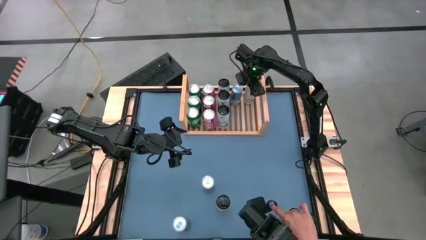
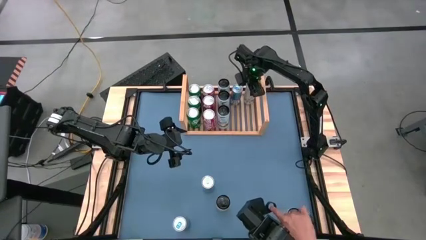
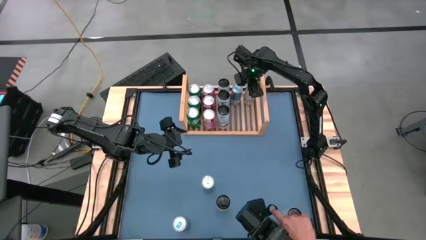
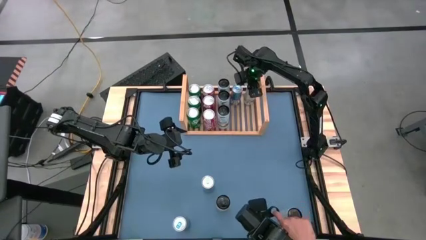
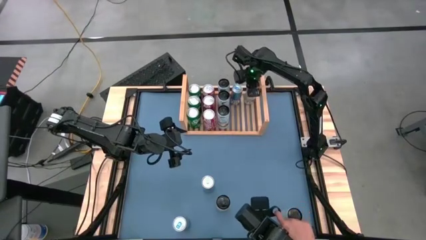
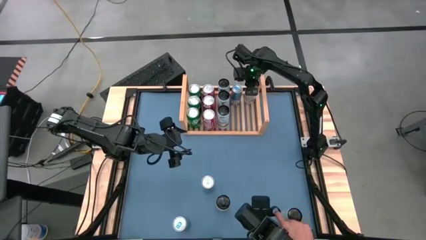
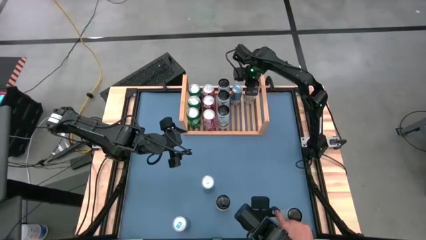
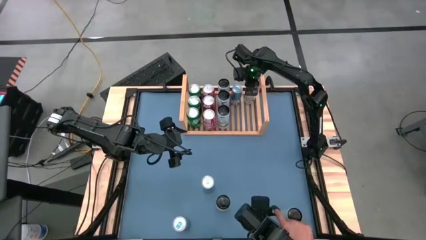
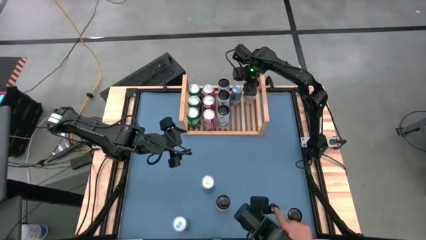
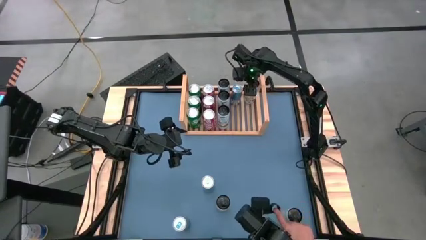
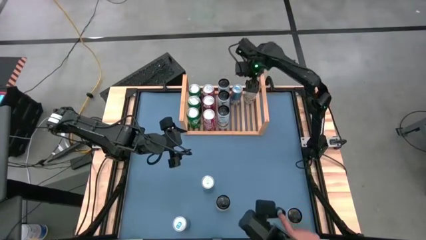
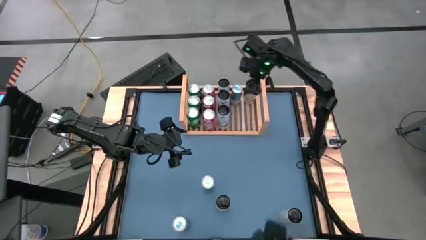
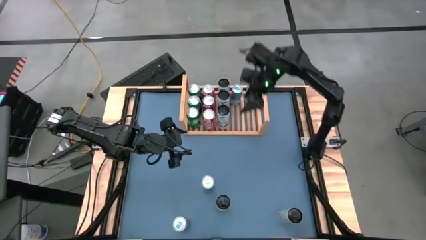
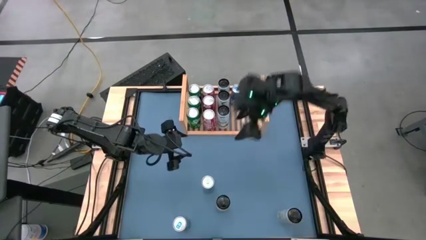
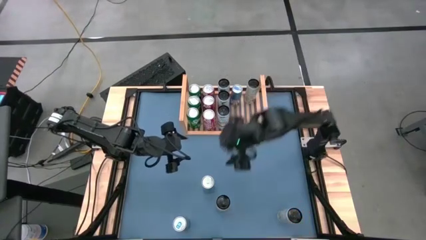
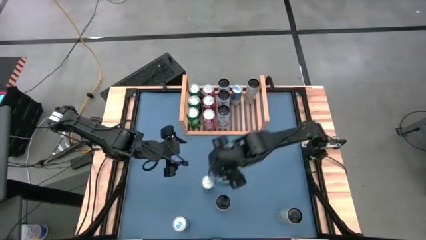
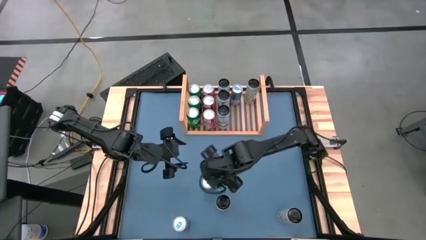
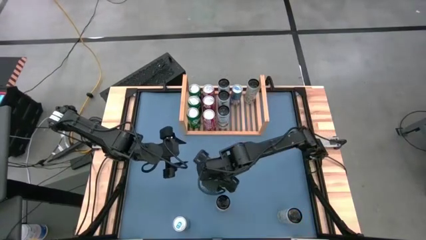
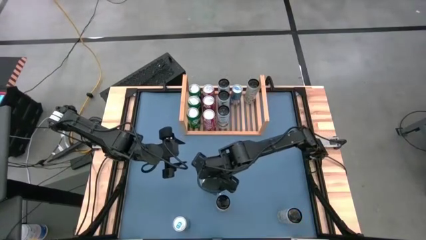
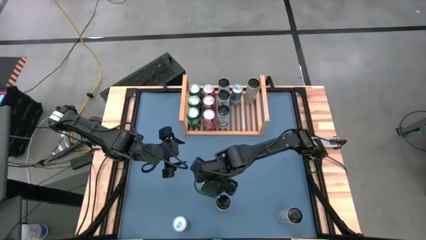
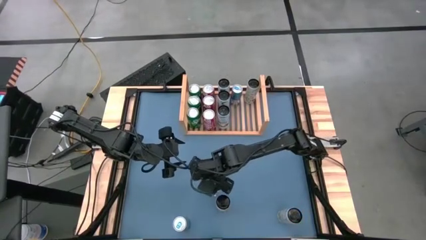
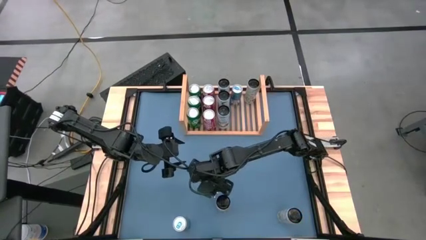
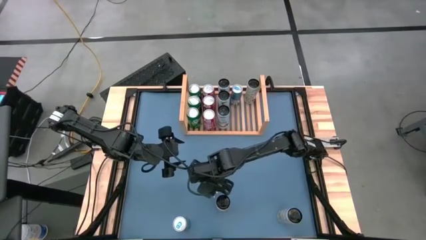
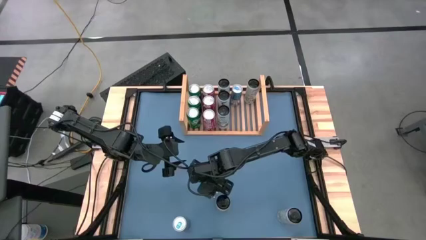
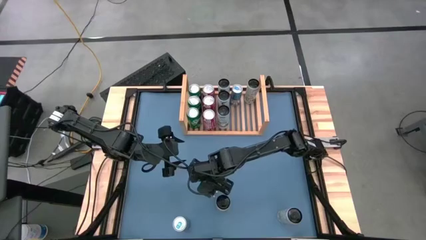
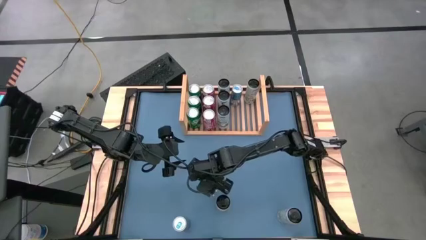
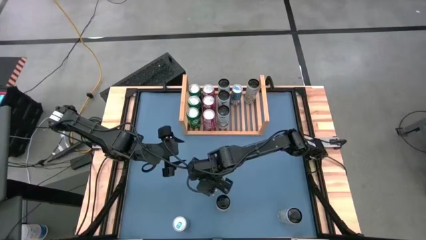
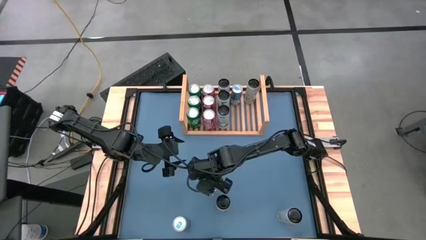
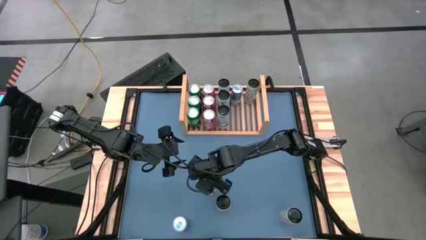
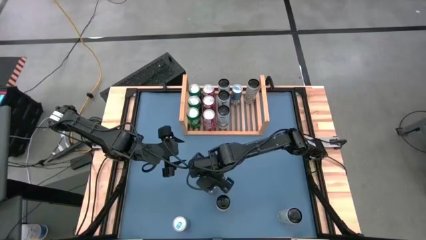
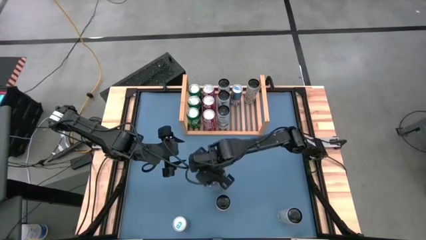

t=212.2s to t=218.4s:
Task: Place canned beverage on shelf
Put the left blue soda can aligned with the blue soda on the shelf

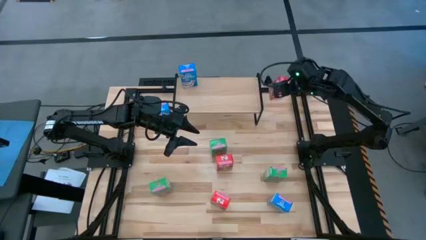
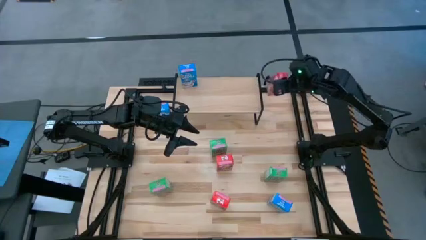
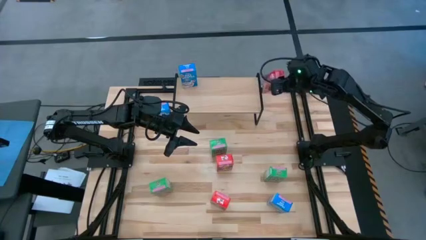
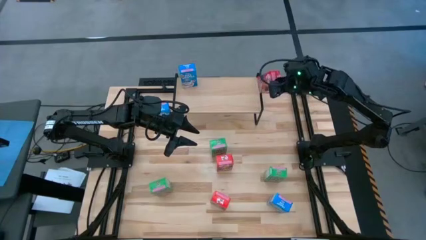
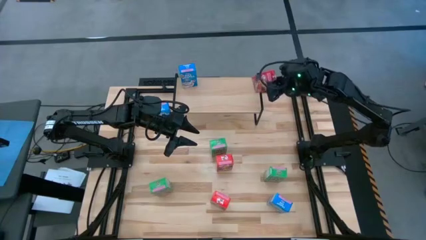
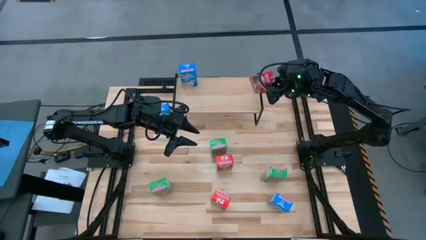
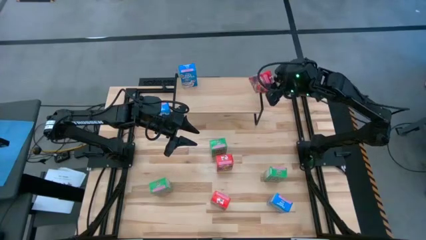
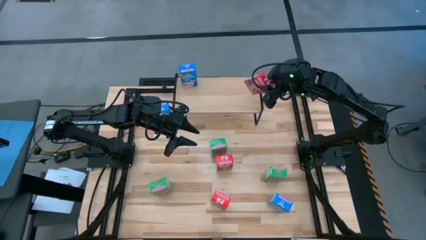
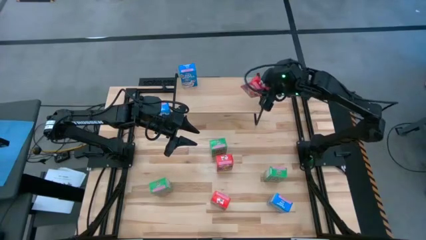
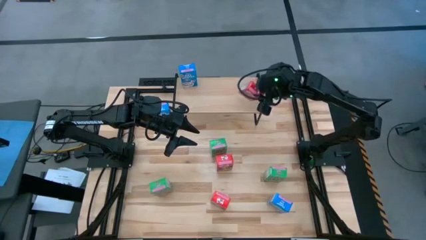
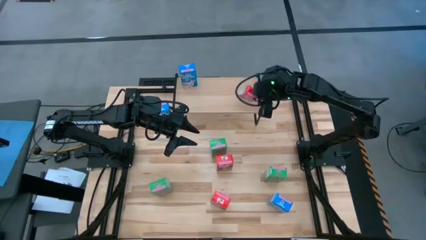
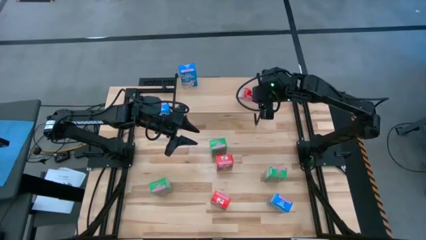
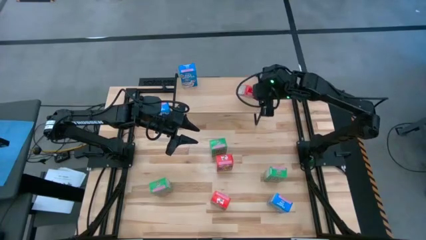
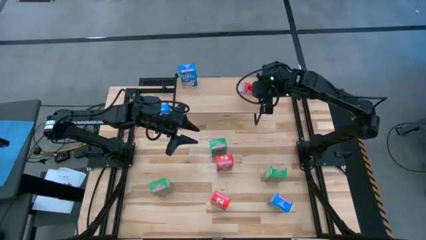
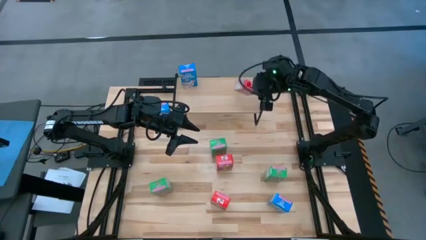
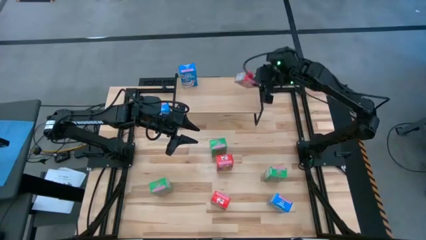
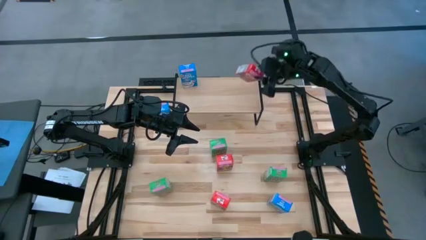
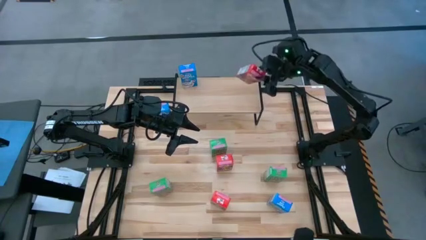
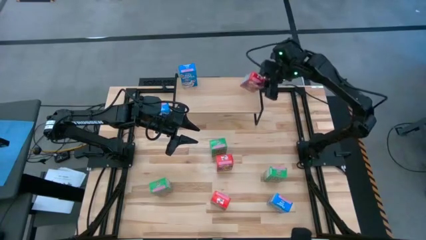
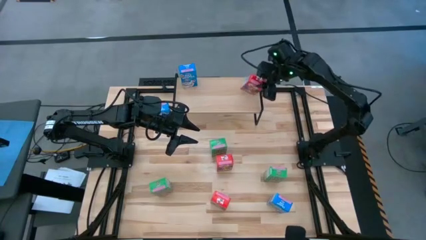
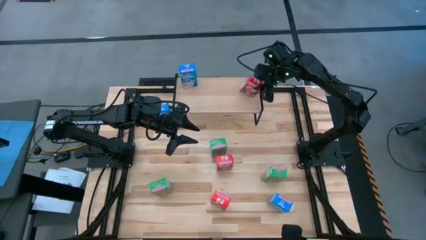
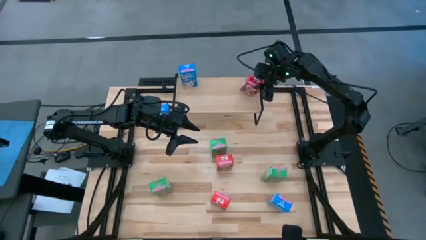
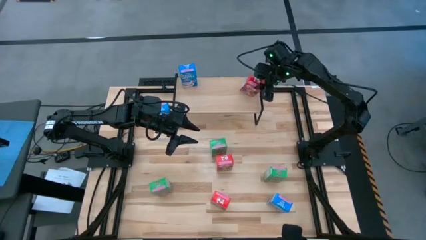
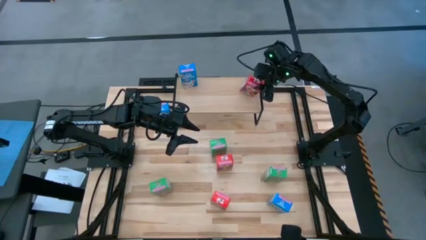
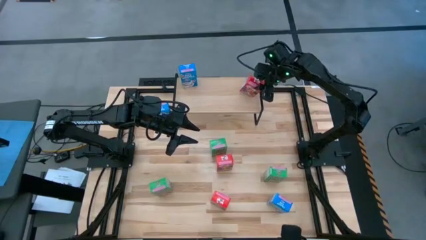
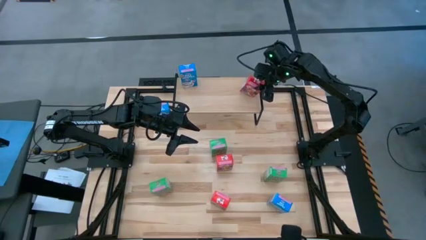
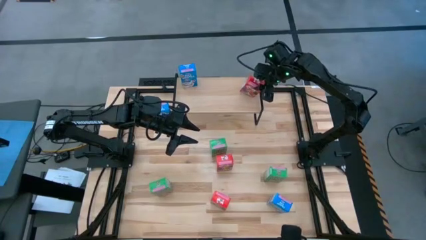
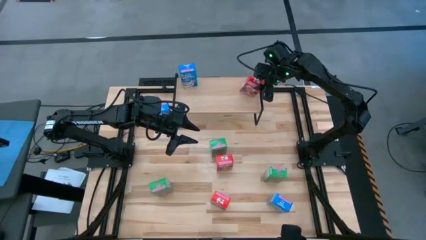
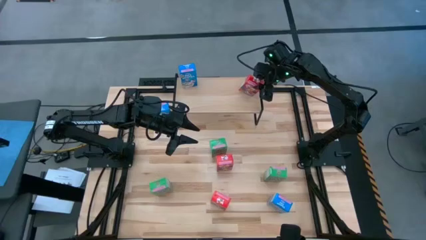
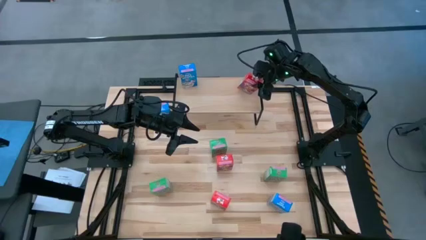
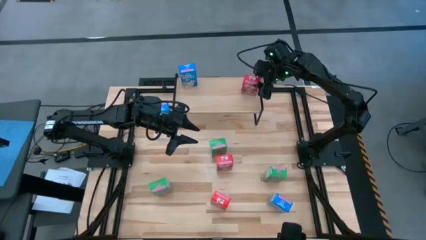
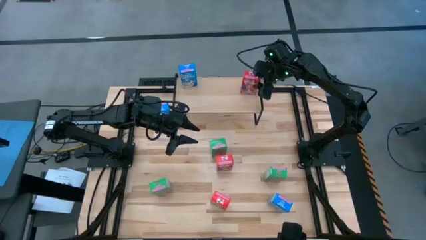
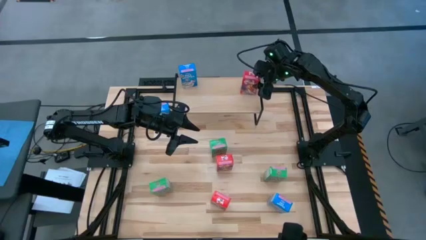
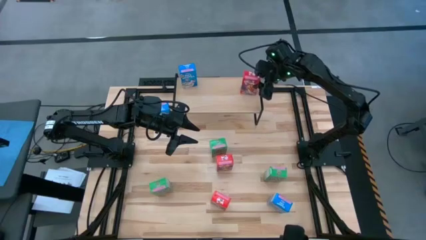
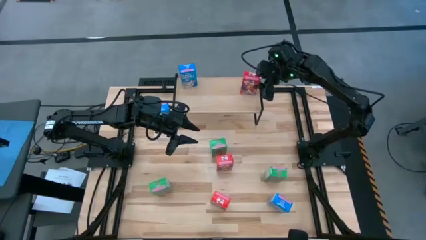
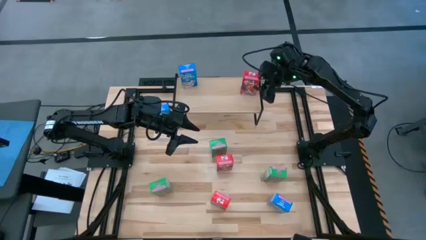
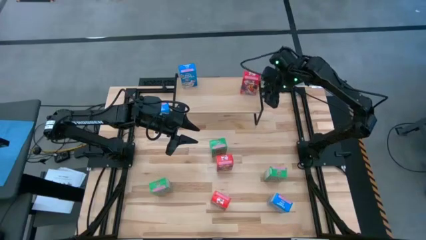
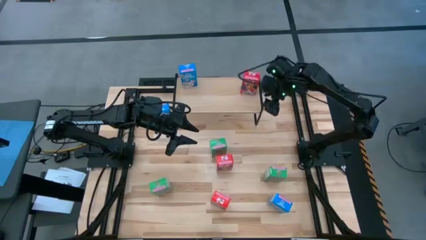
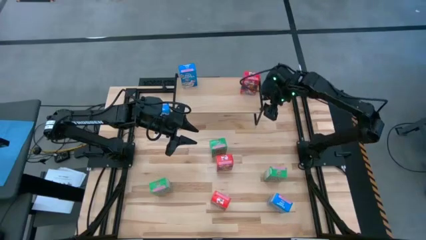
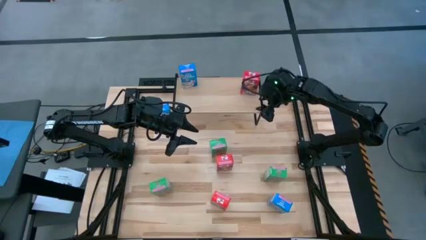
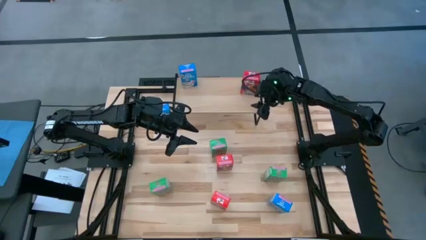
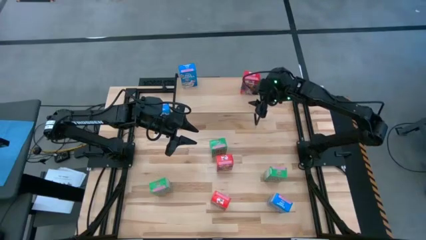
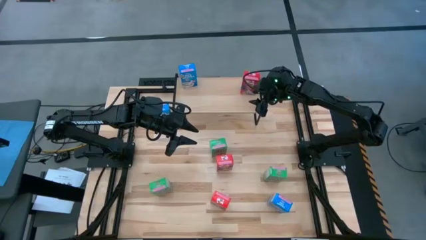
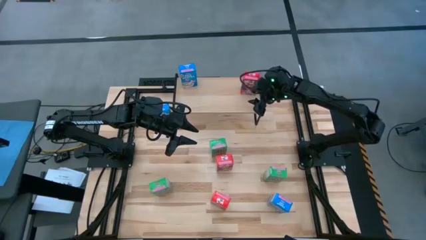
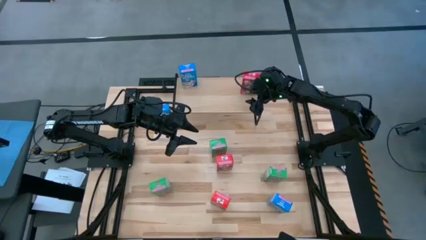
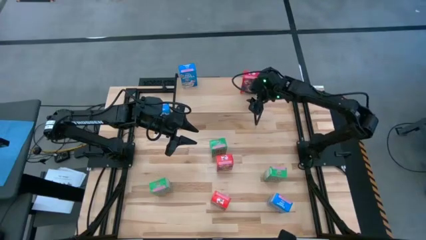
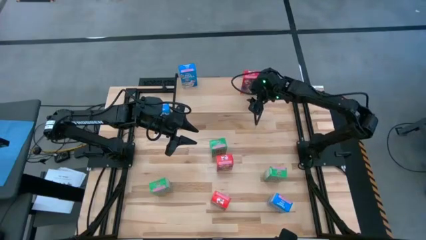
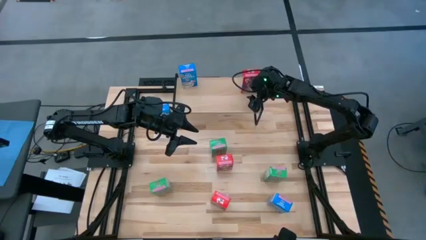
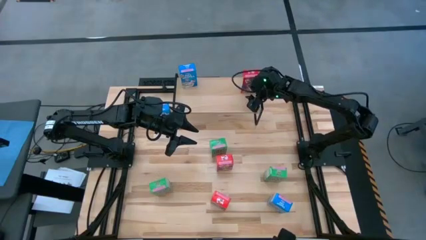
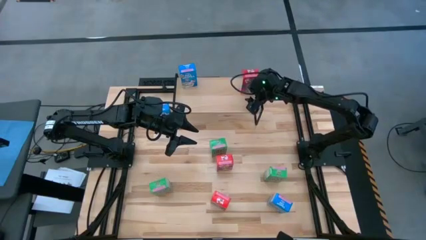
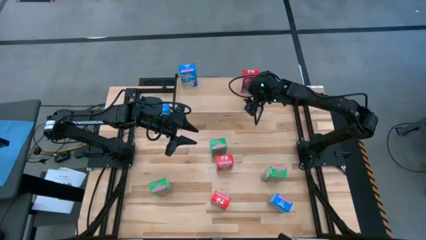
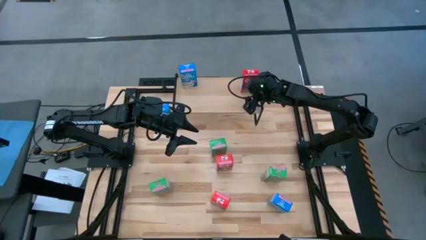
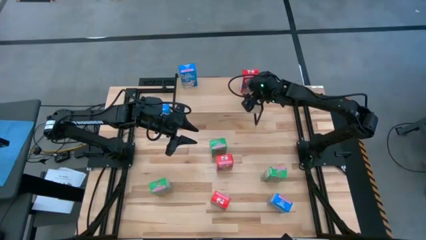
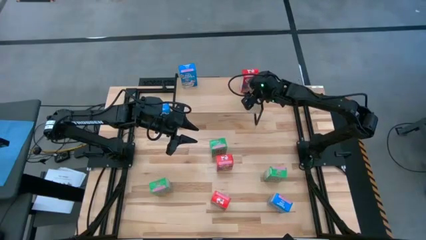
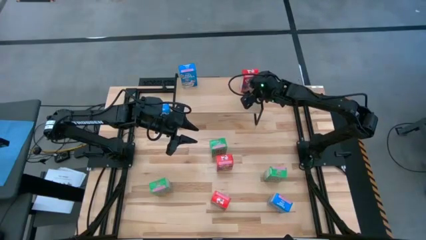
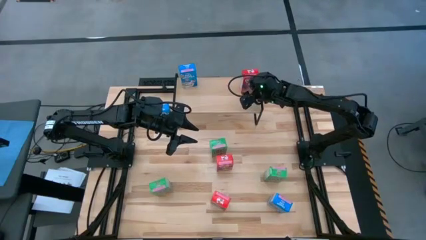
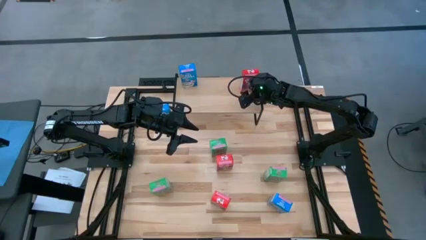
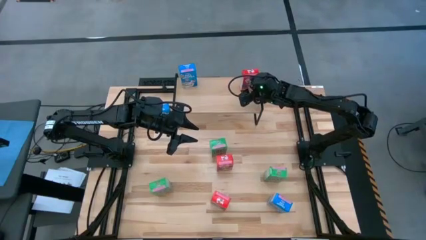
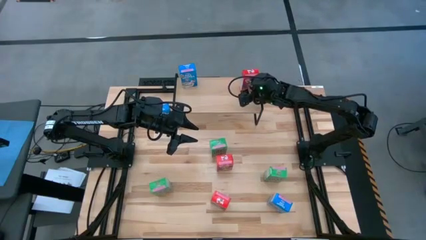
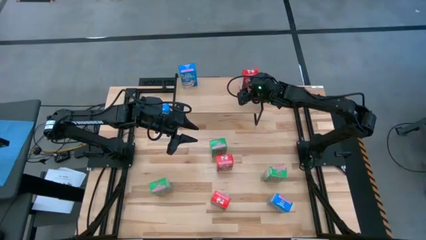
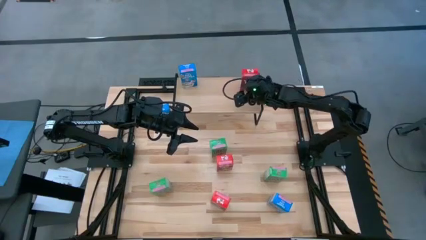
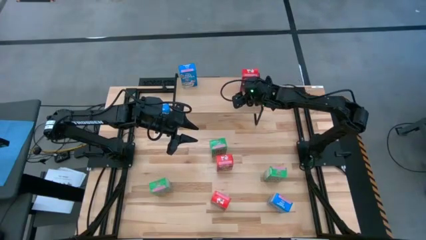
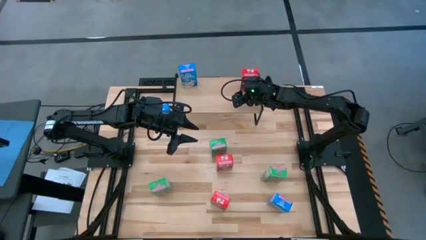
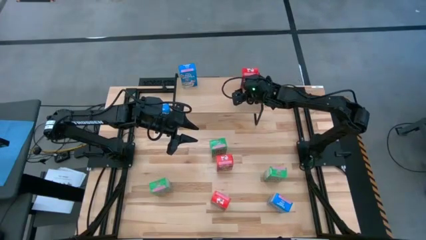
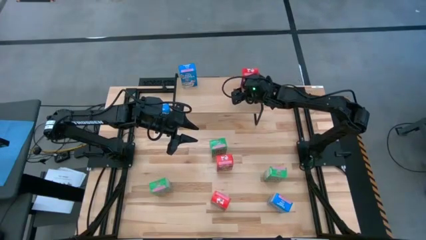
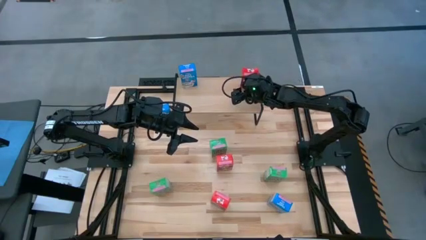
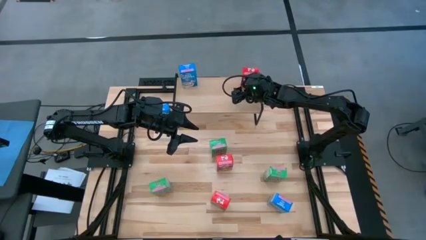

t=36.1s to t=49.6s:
Task: Stack cereal on shelf
Put the top right red cereal box on the shelf
